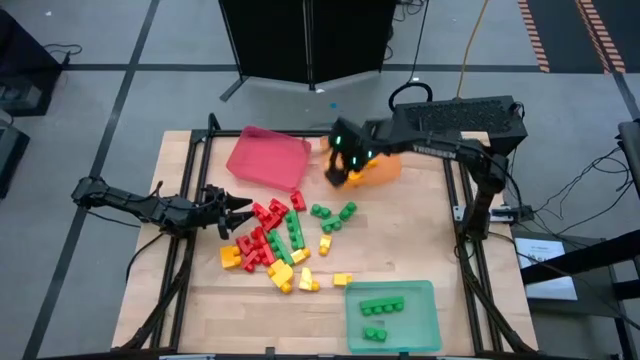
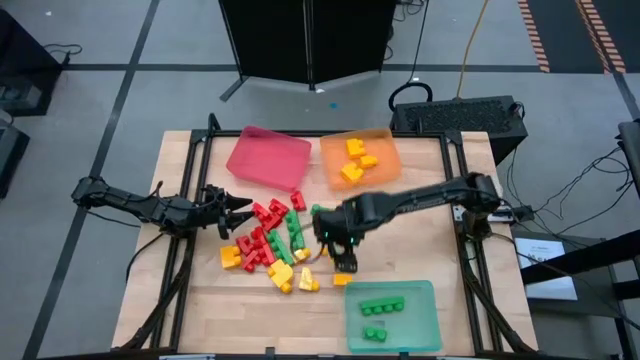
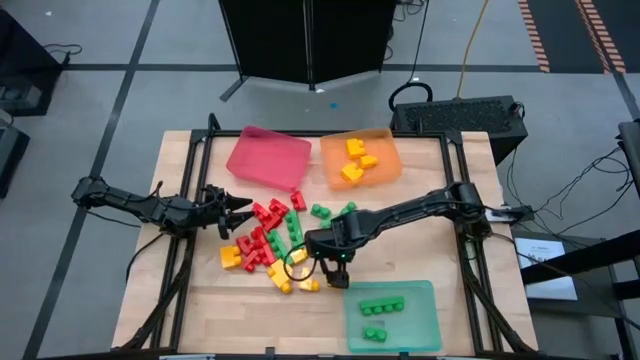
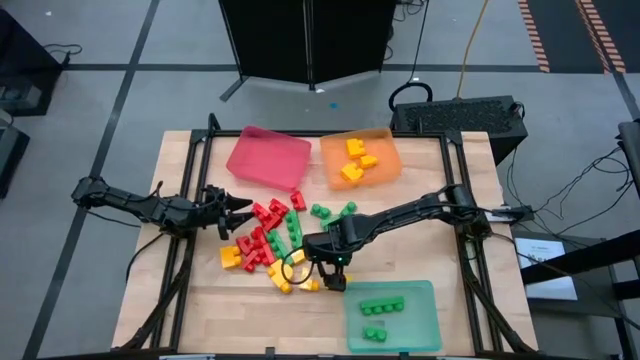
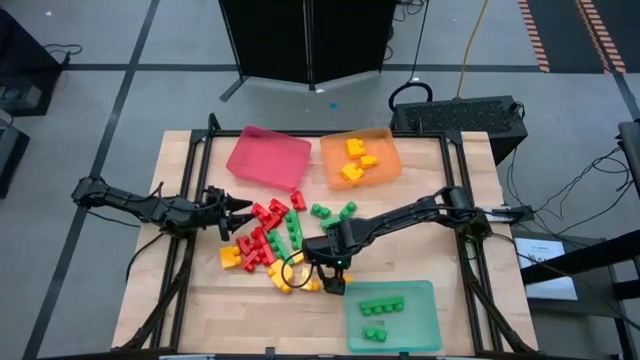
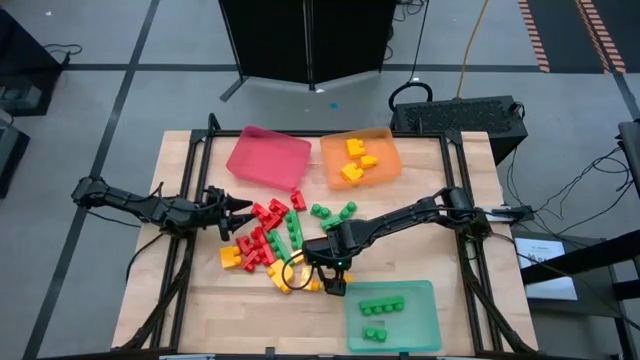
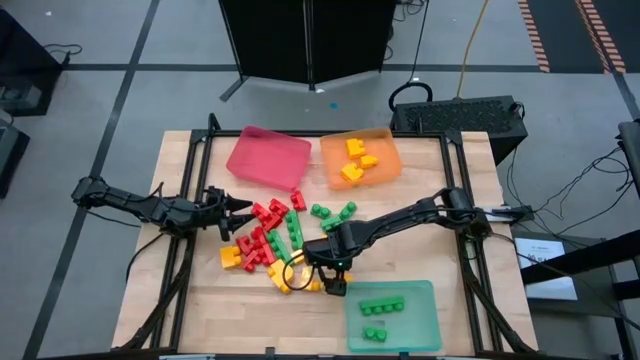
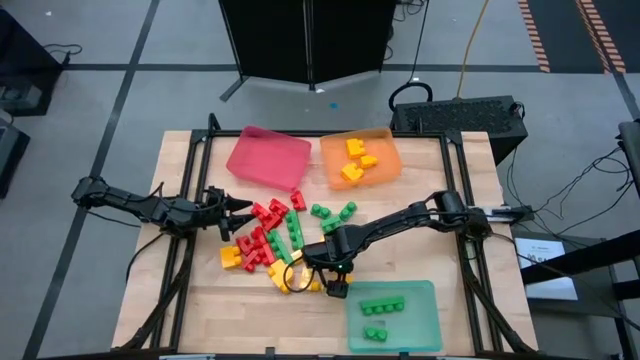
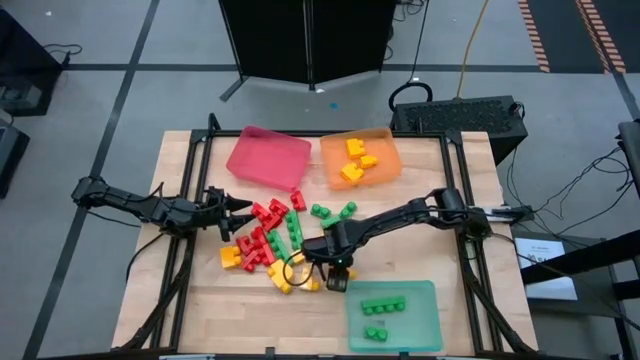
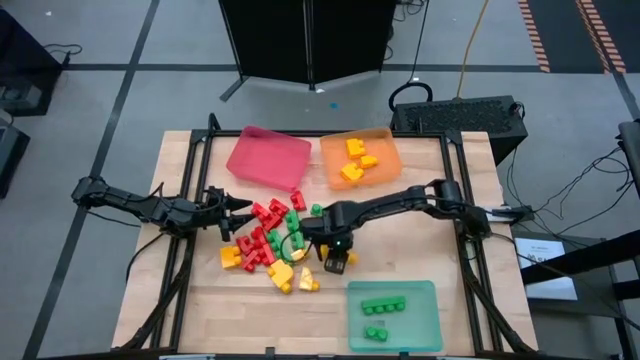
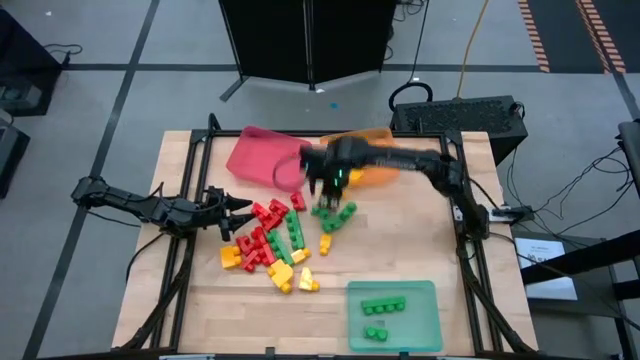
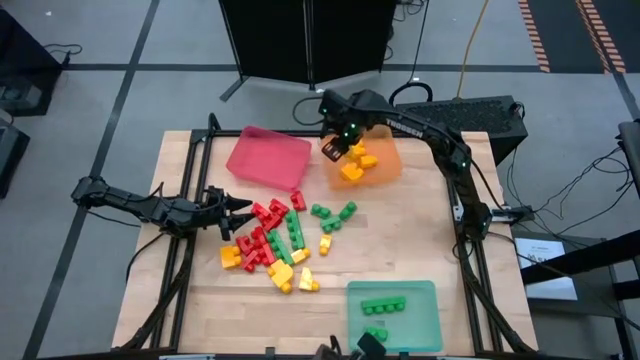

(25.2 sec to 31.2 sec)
Task: Sort blocks
Put the yellow game piece into the orange bin

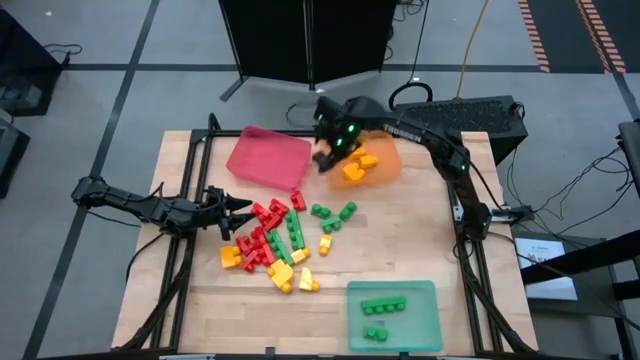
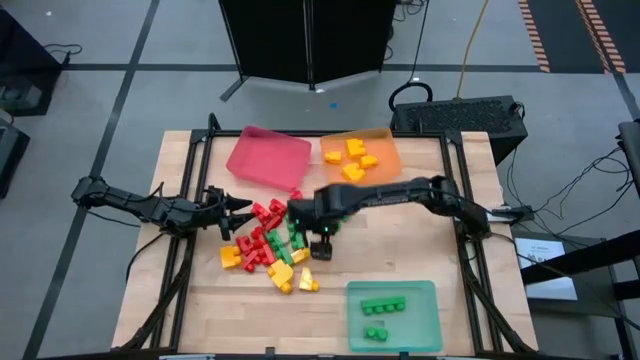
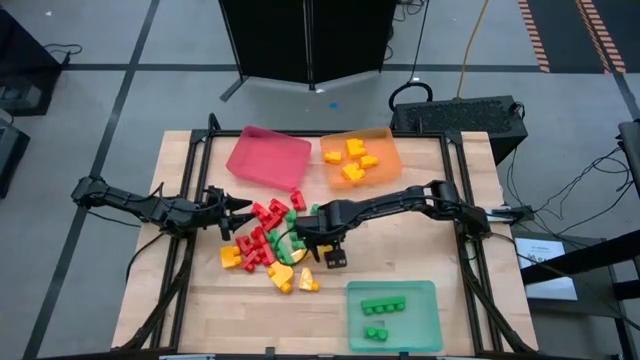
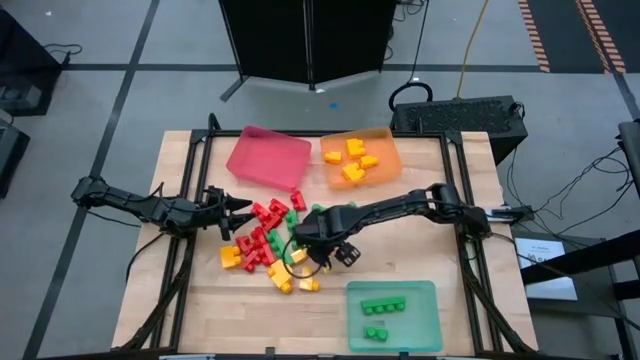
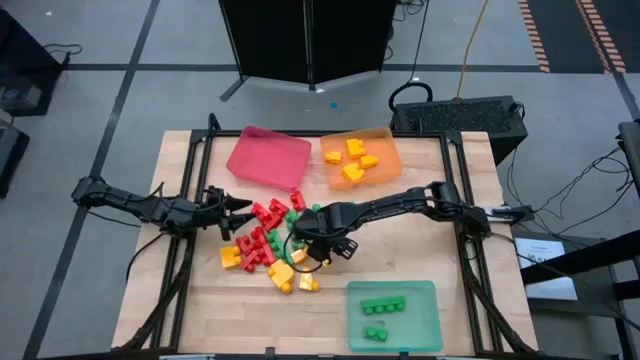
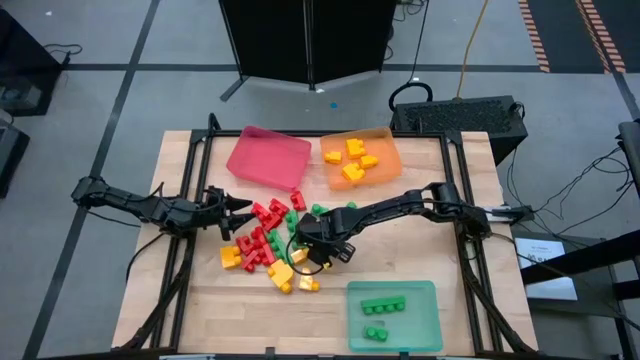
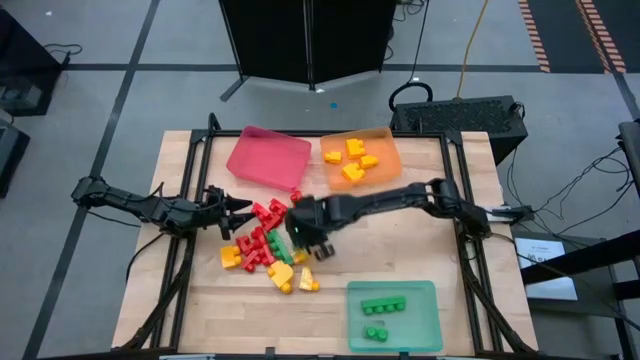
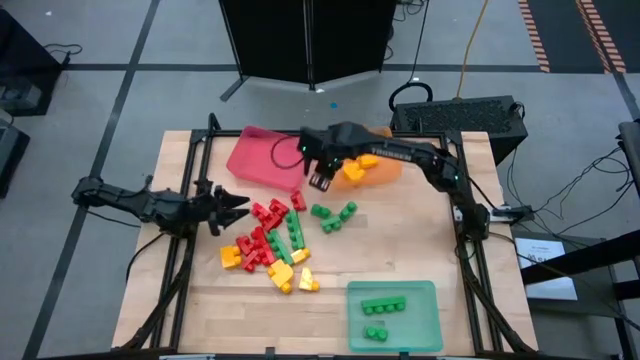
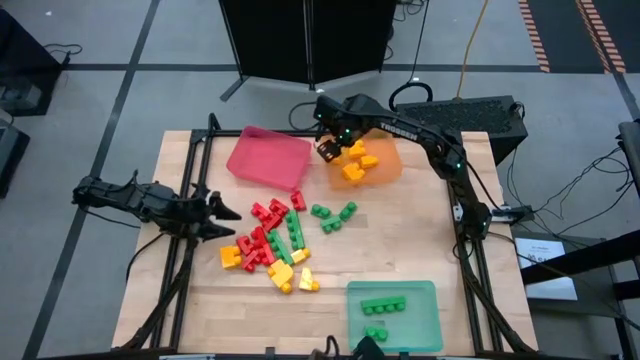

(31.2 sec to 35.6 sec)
Put the yellow game piece into the orange bin

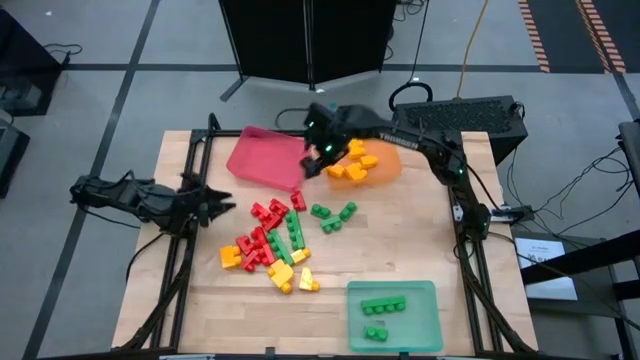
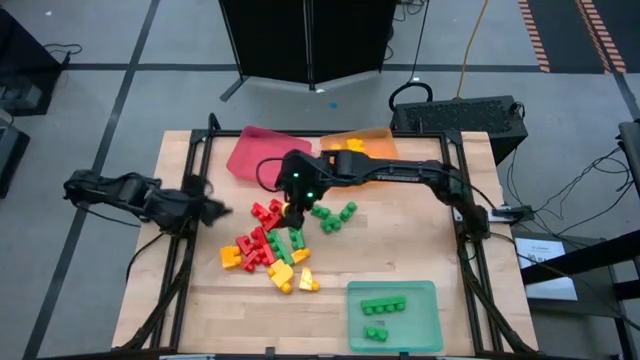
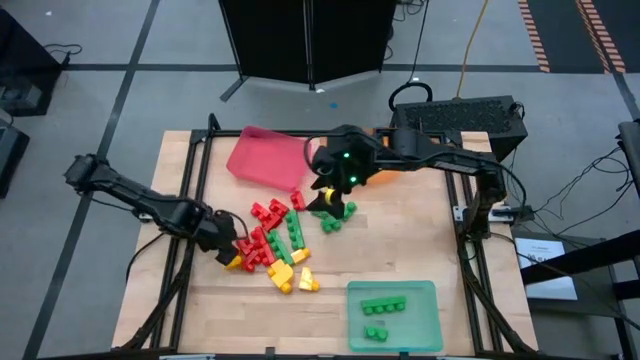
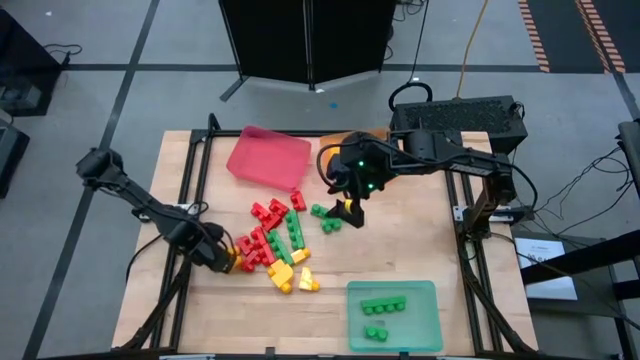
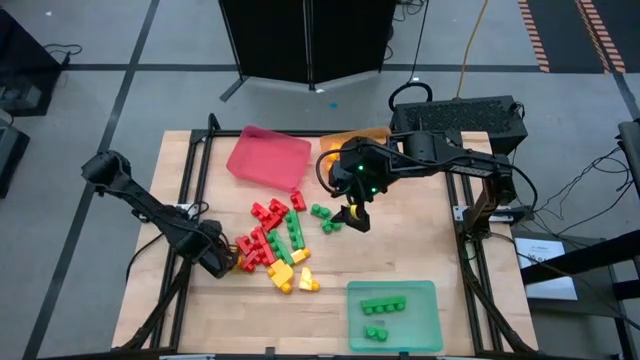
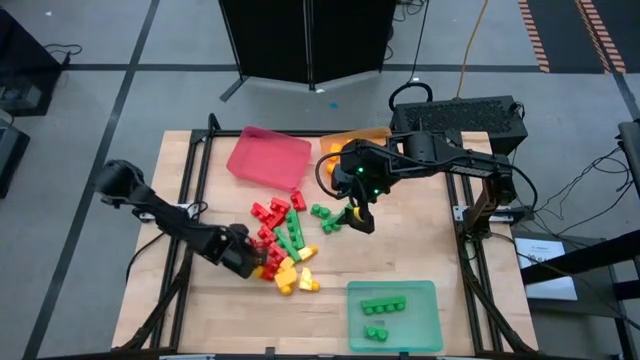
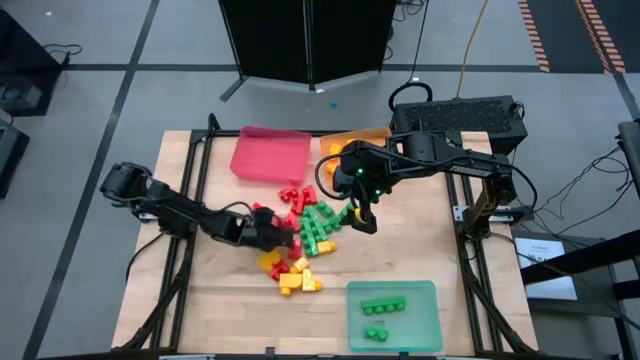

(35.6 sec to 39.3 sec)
Adjust the game pieces on the table

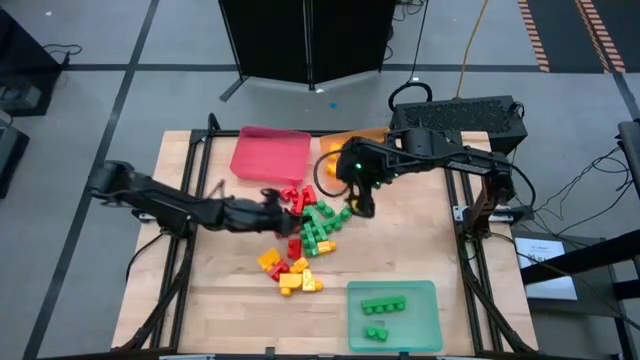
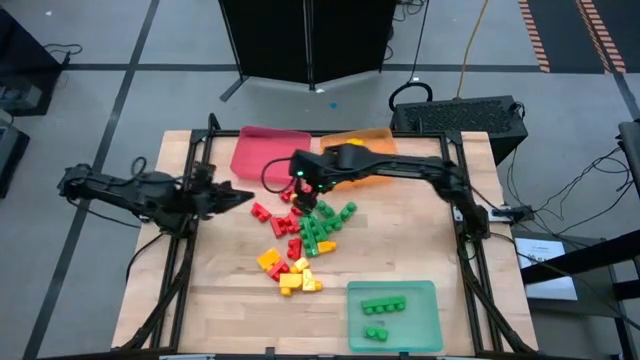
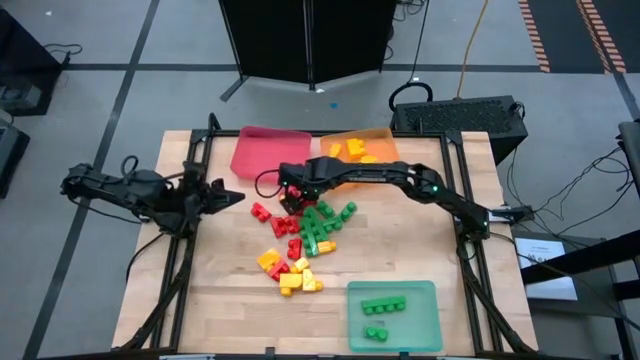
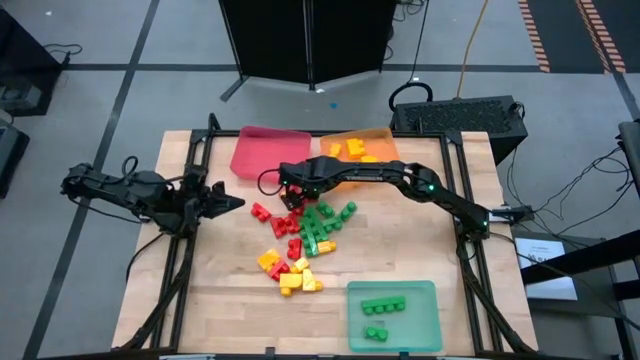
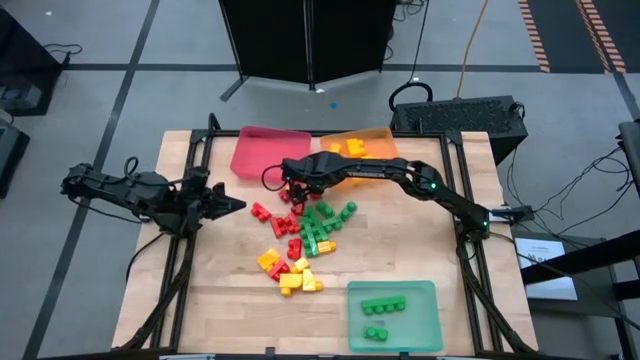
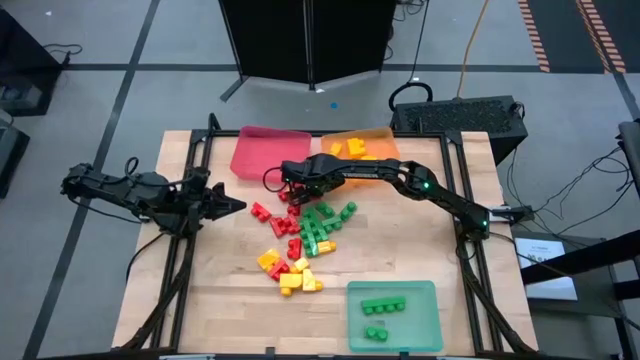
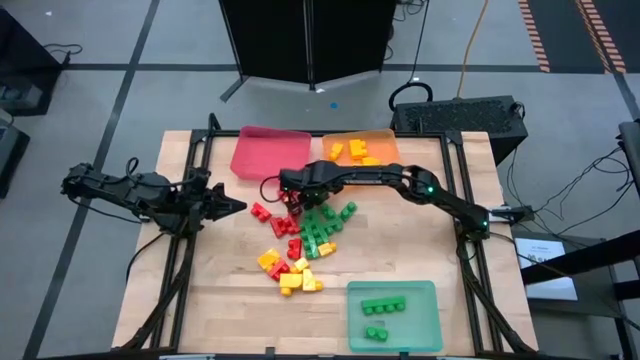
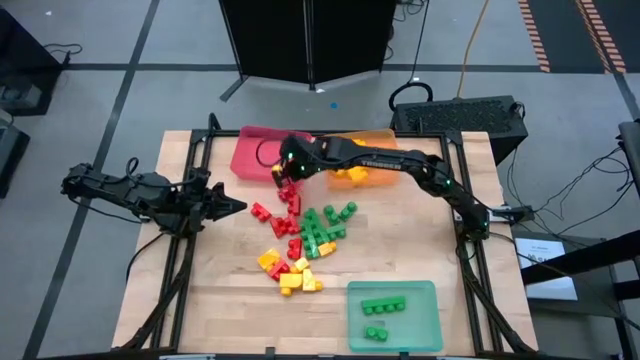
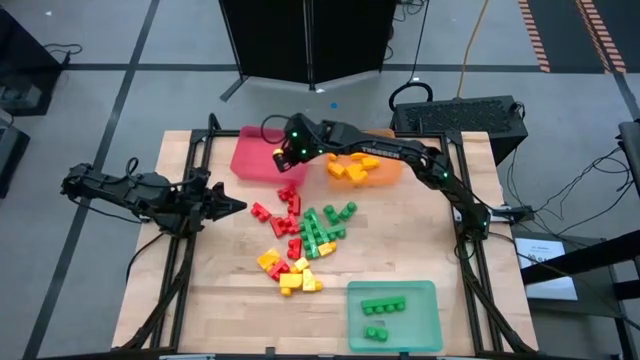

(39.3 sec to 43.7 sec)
Put the red game piece into the red bin

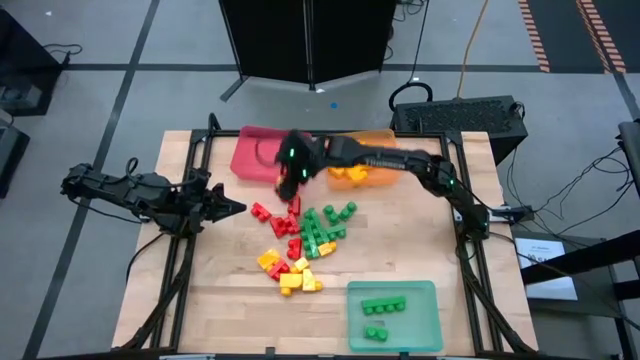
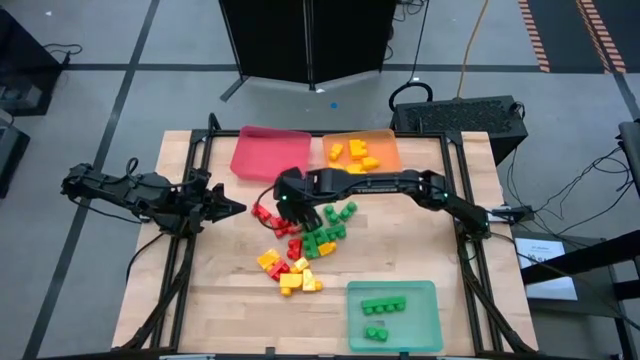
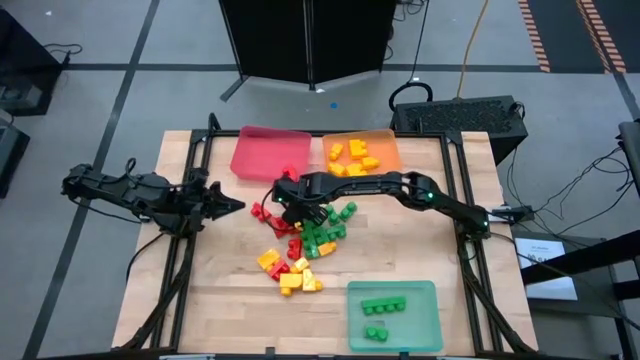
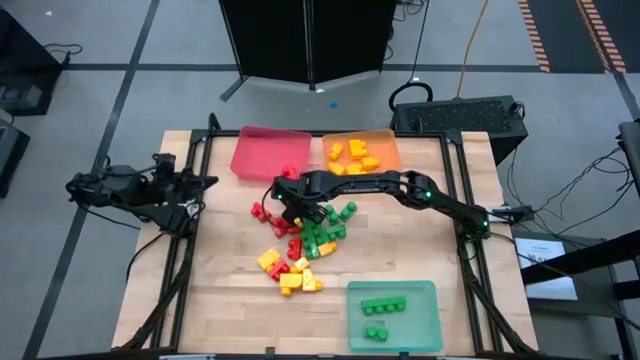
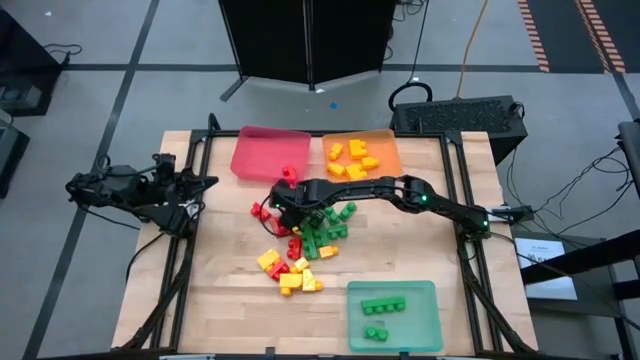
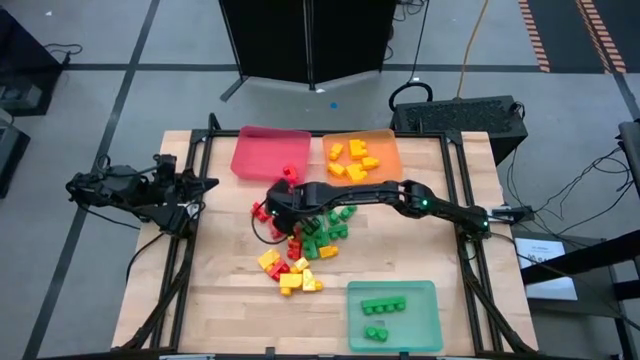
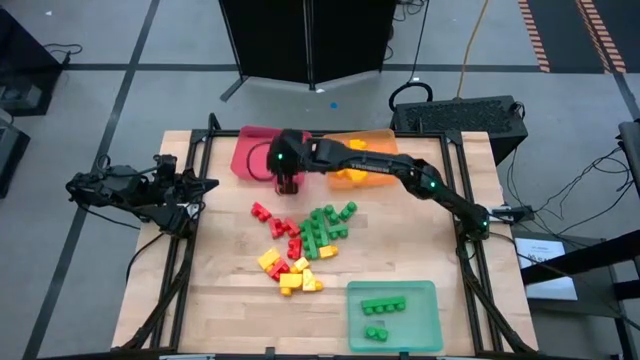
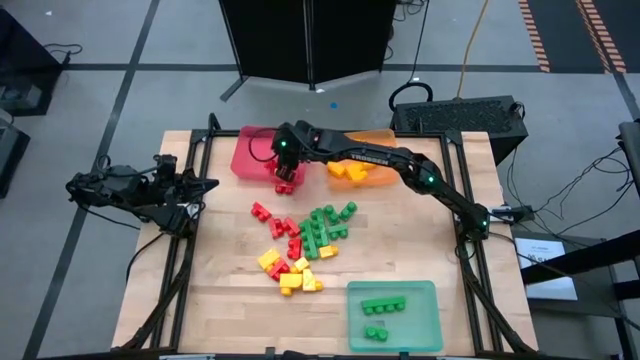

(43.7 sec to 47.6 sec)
Put the red game piece into the red bin
